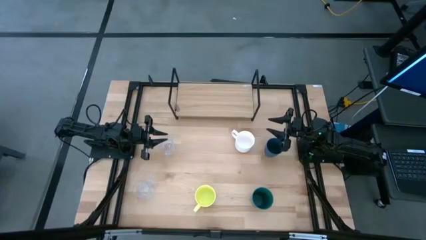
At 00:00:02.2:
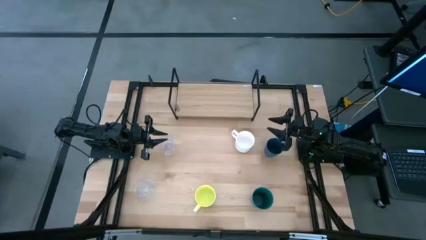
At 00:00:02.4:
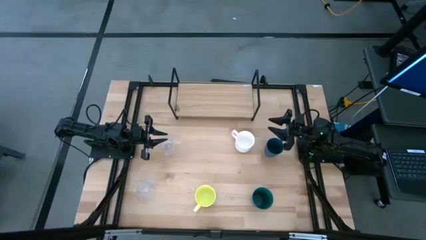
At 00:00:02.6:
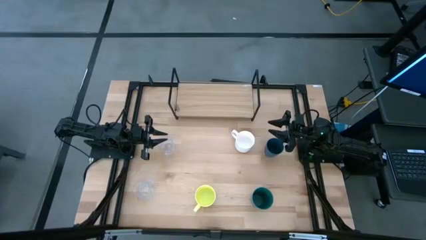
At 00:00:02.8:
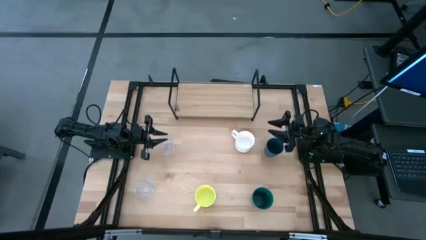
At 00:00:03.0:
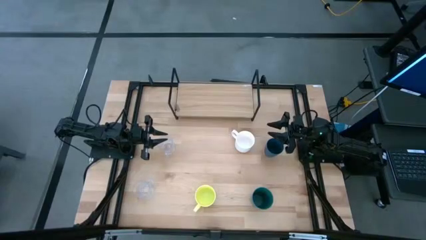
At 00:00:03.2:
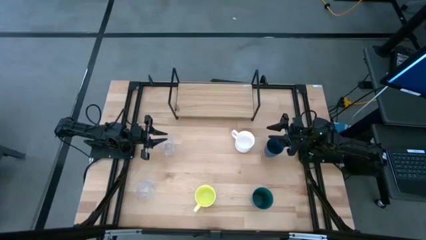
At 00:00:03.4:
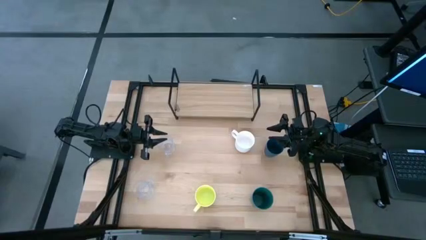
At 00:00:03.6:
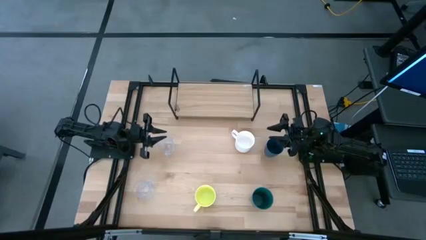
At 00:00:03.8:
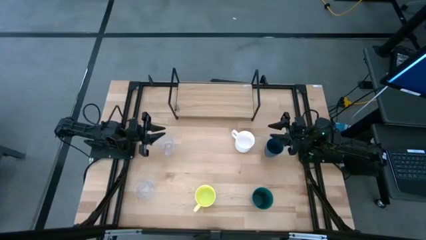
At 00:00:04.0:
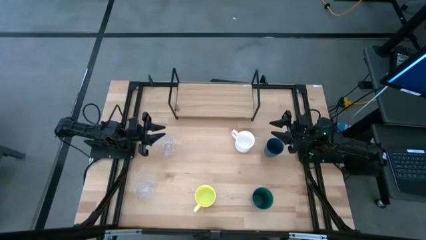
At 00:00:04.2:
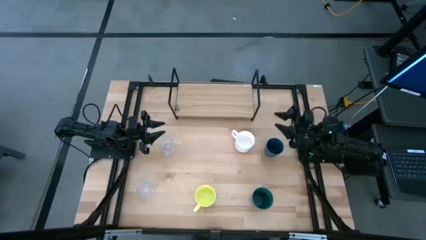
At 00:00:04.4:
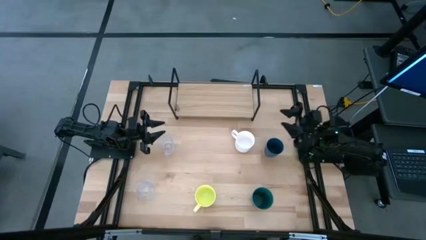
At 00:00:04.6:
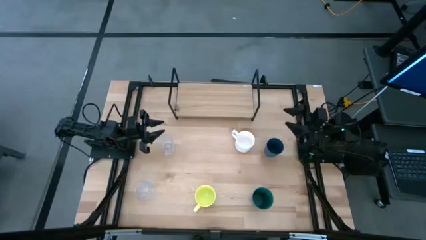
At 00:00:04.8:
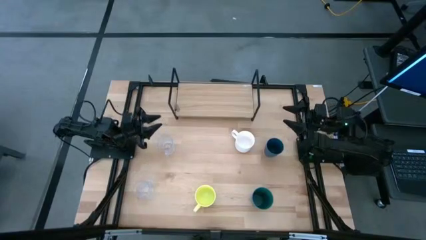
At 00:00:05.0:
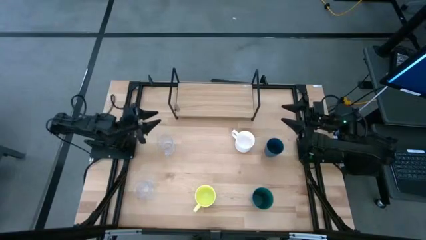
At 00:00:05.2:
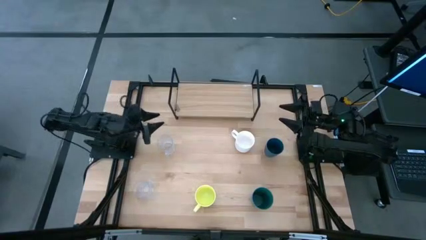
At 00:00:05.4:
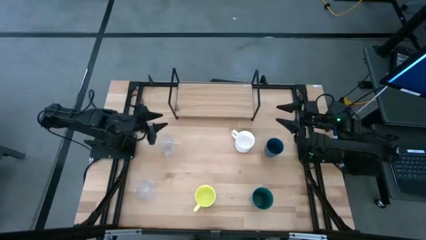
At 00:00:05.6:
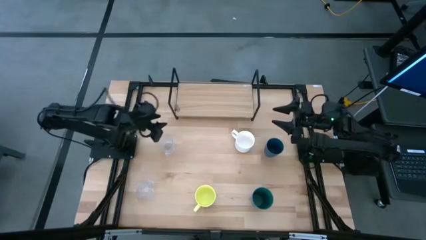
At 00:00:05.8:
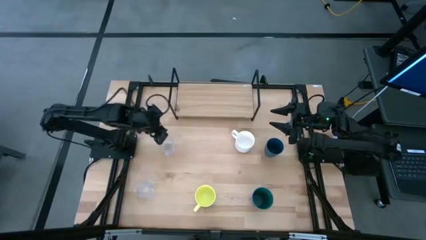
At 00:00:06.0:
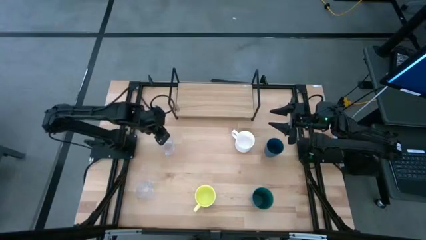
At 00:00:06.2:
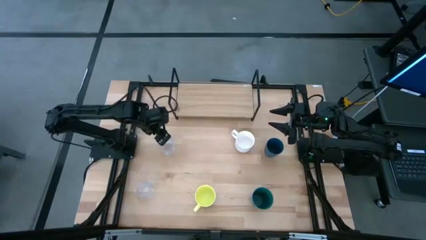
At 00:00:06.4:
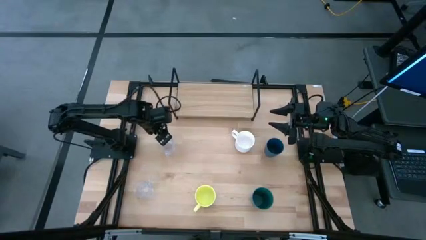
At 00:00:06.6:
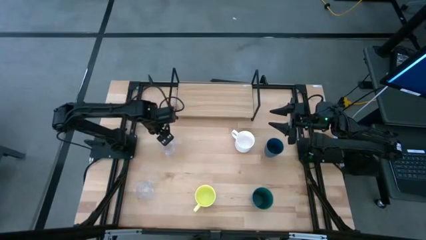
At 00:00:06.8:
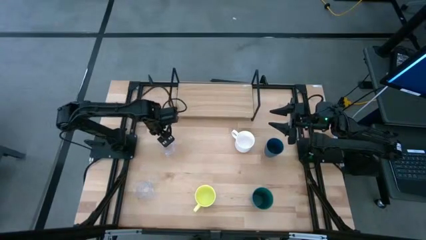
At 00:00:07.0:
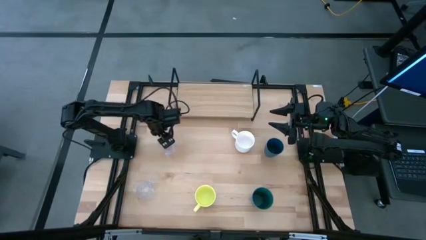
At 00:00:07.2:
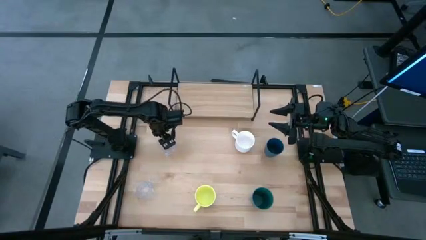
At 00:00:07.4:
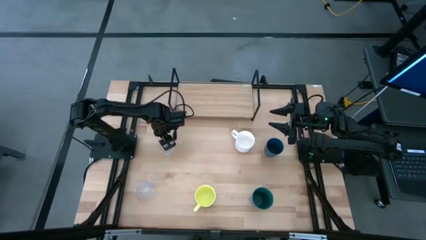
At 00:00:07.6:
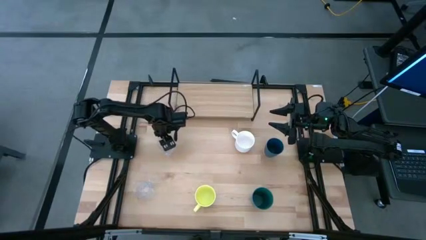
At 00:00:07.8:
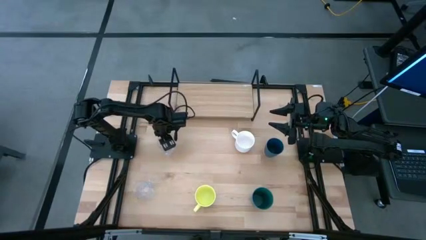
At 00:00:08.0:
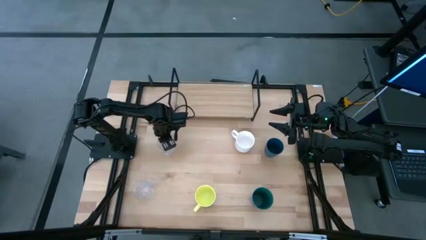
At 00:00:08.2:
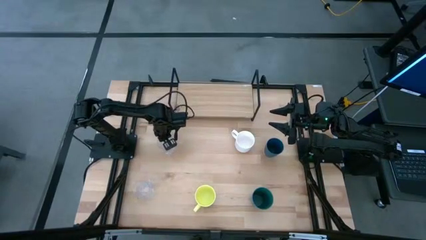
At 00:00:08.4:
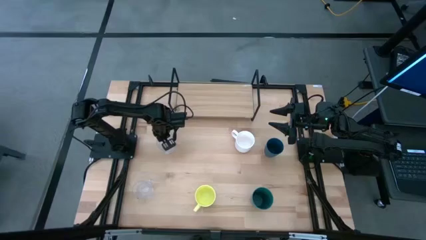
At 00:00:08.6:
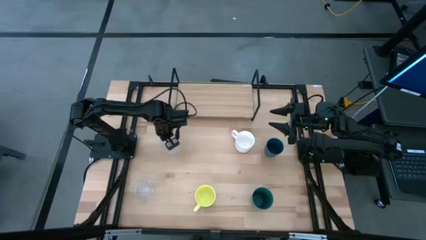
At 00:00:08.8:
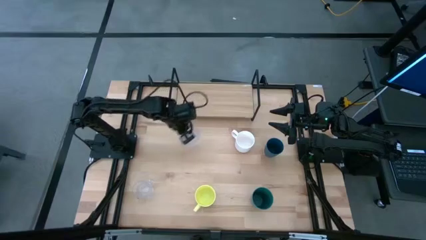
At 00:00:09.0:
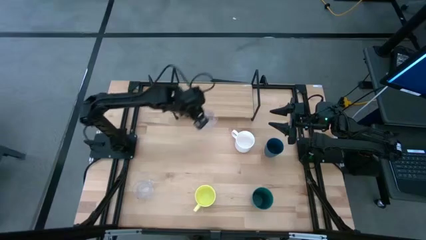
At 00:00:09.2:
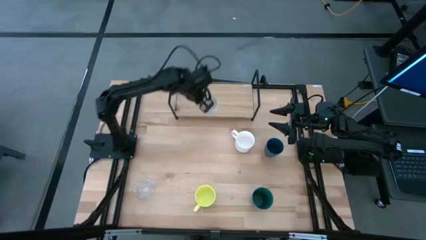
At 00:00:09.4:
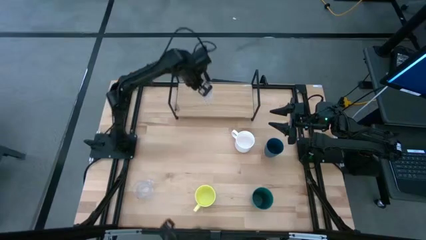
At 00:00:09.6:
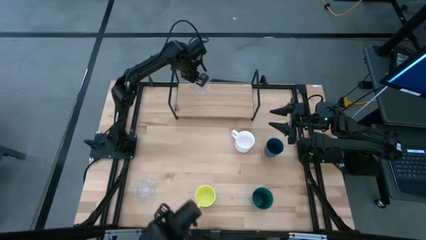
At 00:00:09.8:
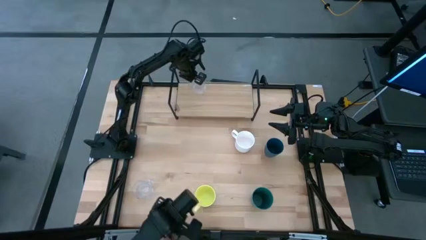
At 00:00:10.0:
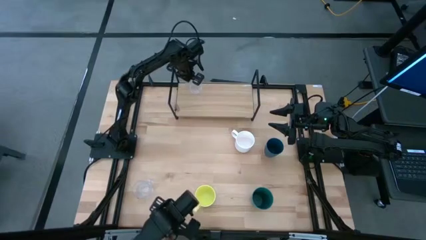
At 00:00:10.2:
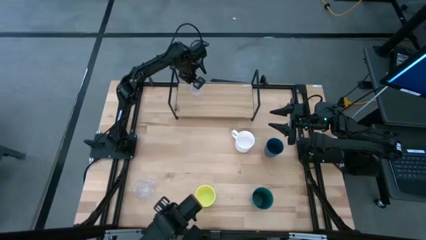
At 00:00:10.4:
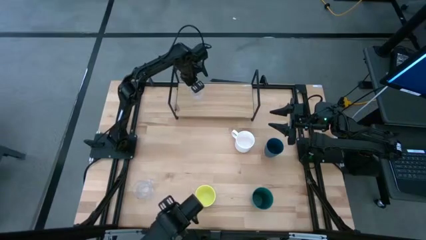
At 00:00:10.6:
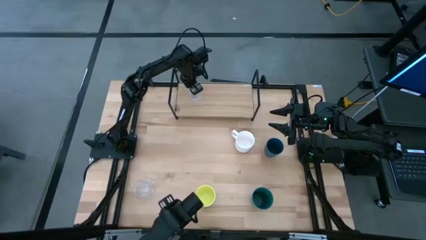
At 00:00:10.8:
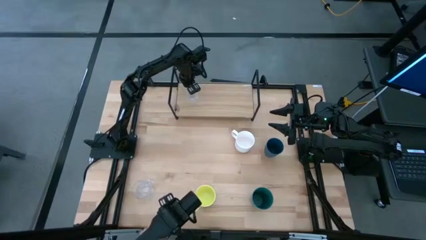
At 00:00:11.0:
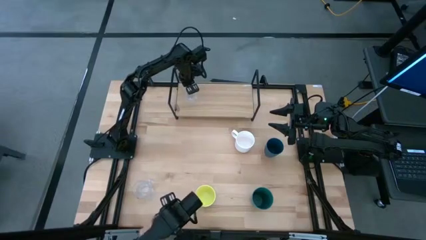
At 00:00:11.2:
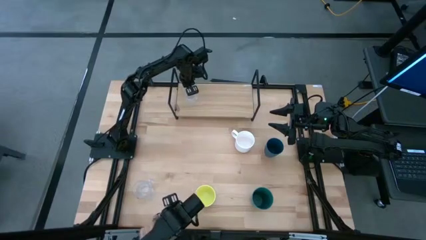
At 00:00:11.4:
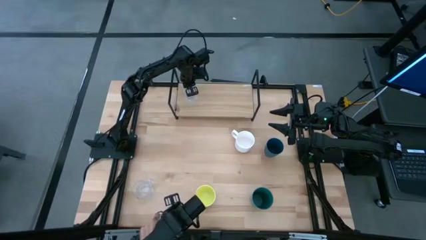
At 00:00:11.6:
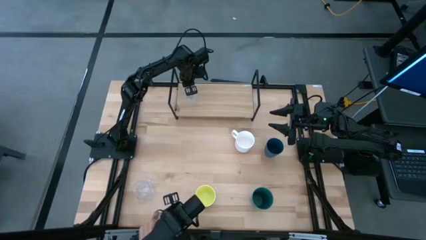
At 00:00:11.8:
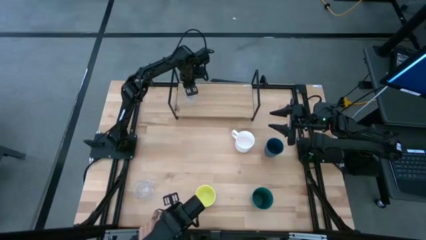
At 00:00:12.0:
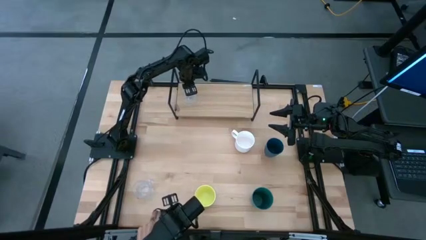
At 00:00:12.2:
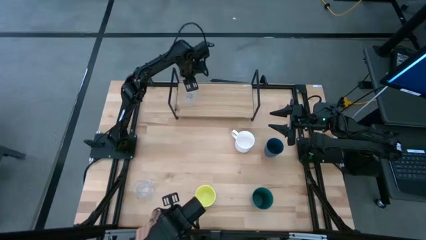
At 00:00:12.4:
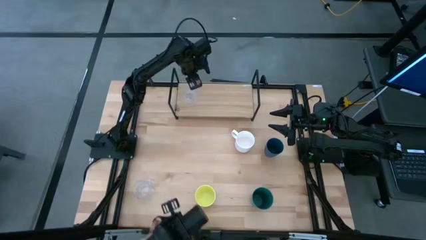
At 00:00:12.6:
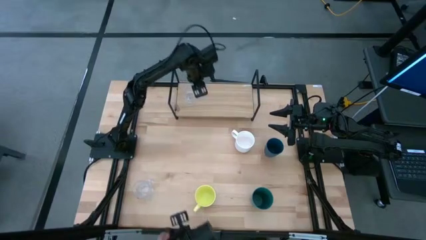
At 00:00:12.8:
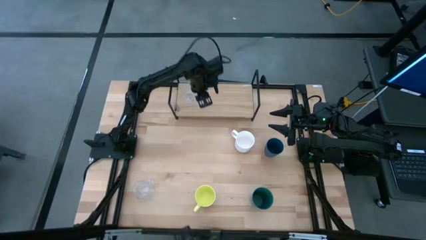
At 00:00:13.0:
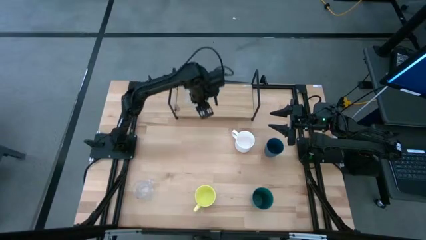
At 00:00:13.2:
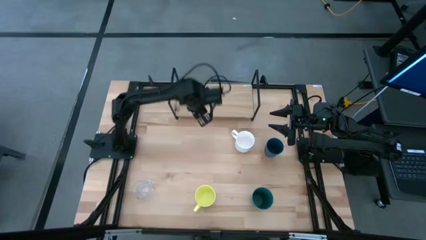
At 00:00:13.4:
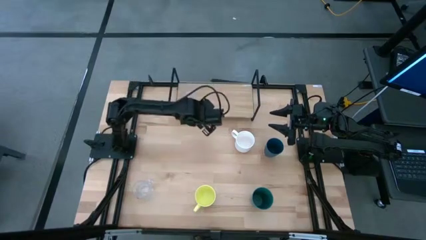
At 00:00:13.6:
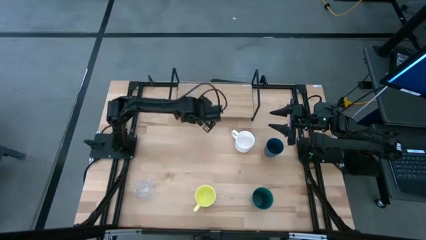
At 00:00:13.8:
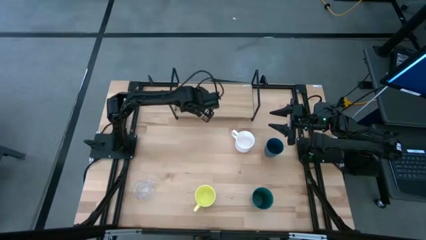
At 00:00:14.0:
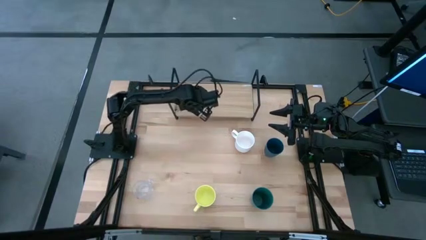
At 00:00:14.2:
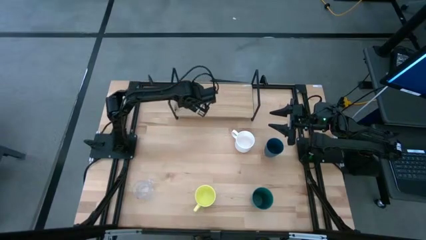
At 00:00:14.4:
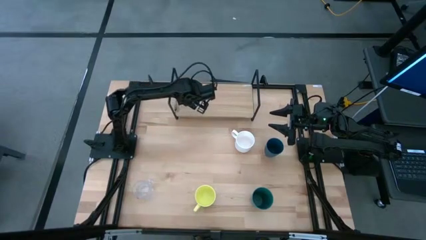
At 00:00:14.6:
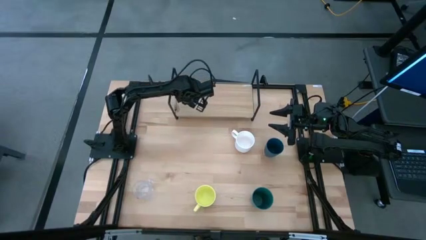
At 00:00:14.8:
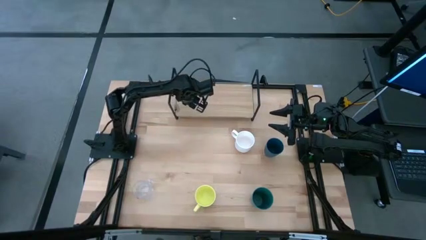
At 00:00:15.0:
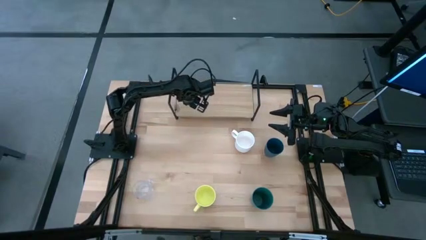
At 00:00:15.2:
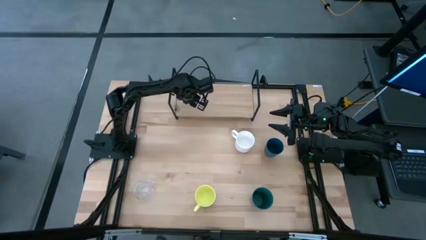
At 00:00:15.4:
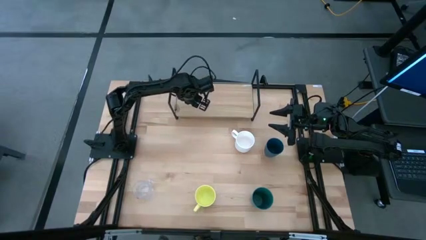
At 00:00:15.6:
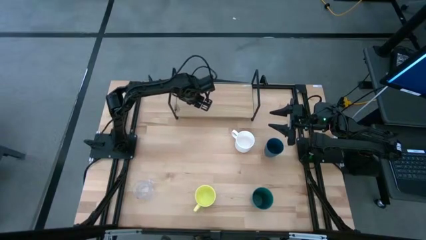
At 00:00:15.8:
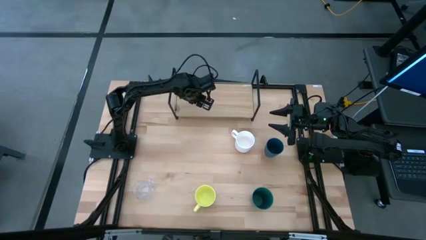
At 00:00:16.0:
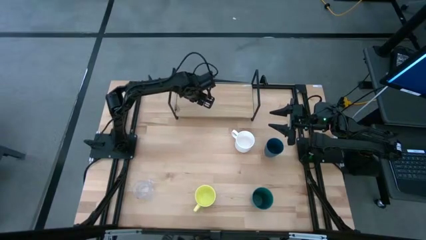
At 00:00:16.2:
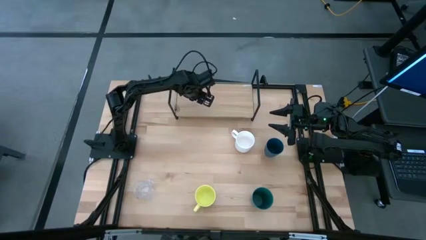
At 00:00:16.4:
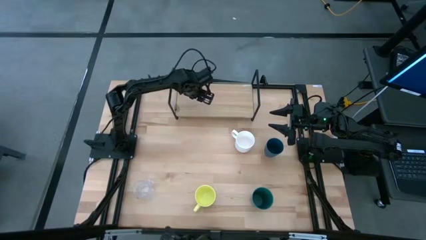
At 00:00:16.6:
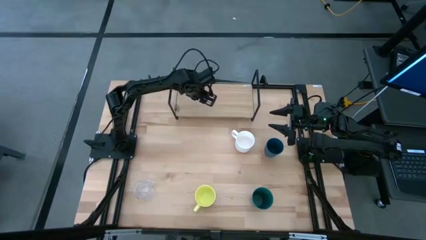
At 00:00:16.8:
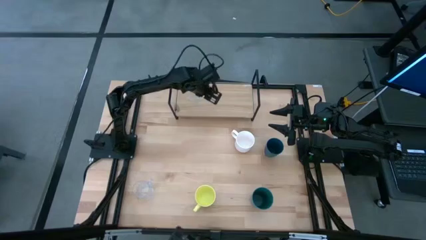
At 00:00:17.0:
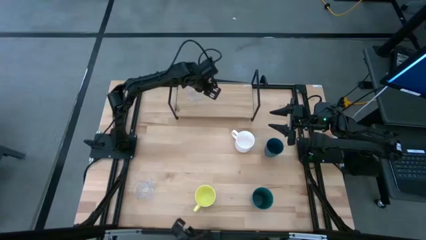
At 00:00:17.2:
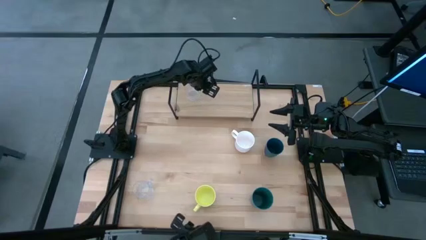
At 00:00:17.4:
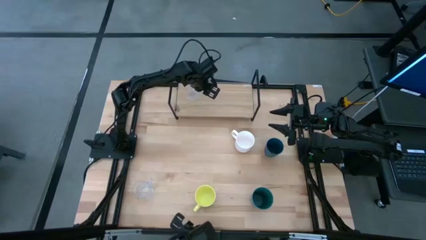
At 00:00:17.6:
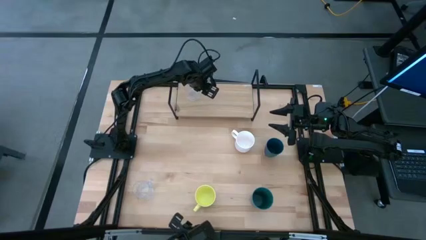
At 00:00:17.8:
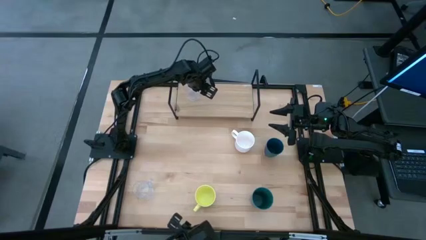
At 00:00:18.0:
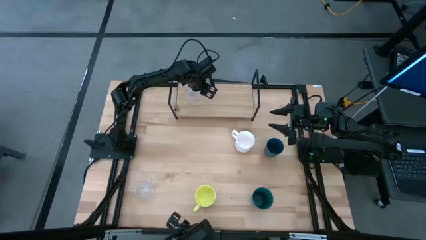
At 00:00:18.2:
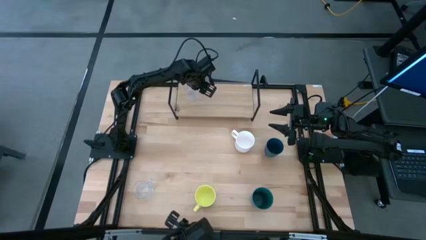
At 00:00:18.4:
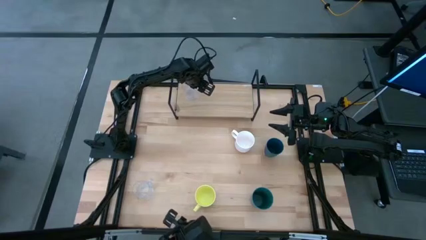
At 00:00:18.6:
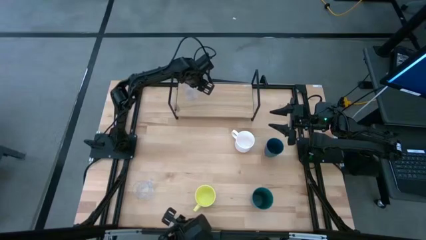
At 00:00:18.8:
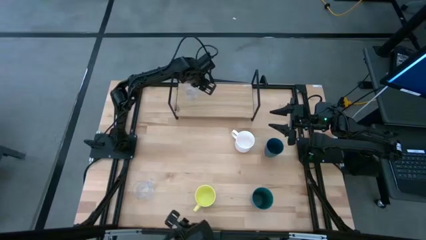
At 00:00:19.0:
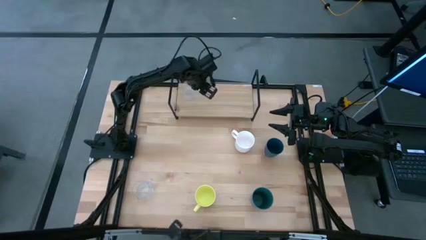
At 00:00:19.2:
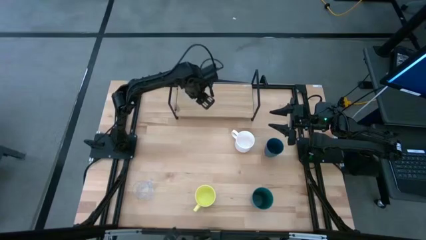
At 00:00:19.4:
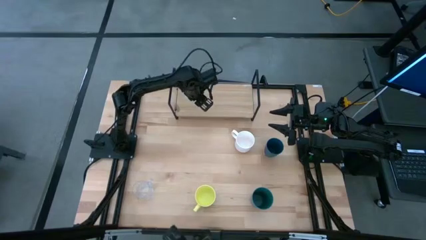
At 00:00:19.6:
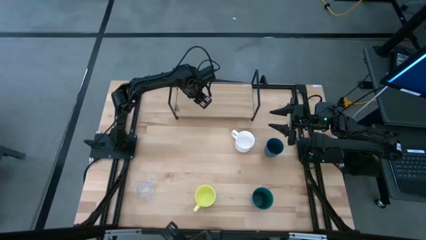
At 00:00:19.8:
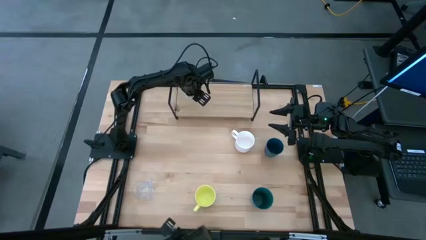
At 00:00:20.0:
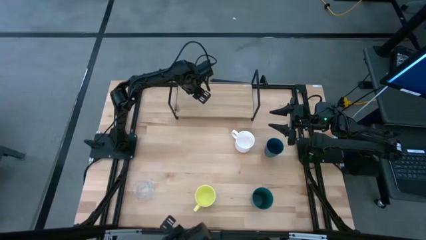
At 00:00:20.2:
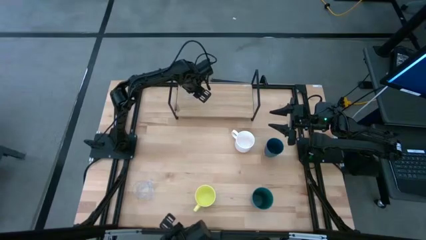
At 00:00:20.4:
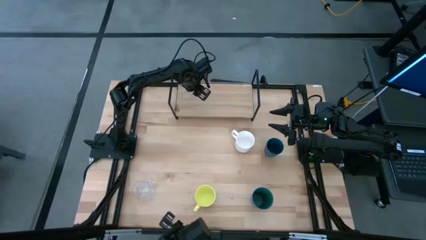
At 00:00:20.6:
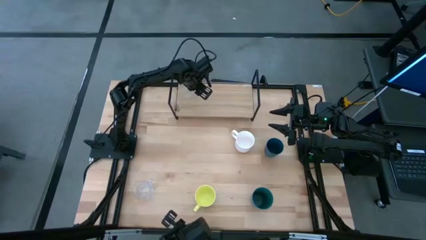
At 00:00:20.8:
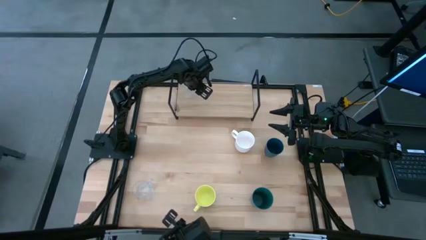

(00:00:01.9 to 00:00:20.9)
Task: Stack small to large cups/mugs on shelf
Put the top transparent mug on the shelf
